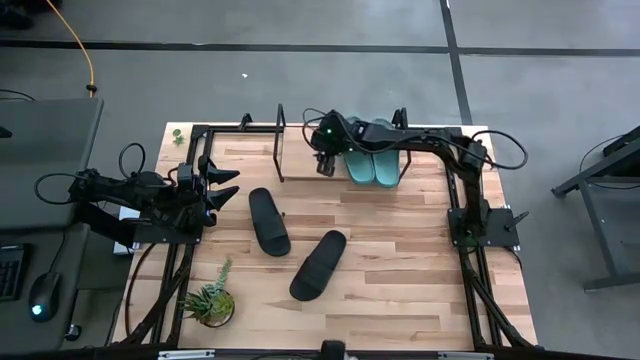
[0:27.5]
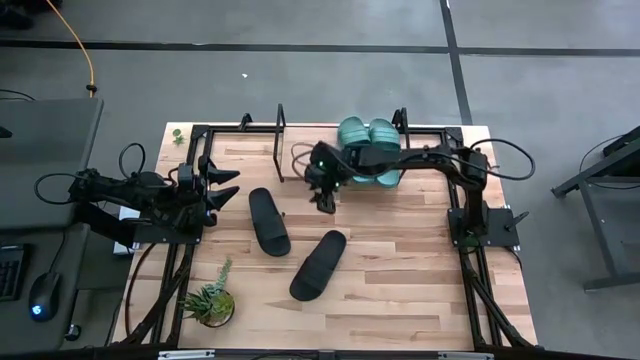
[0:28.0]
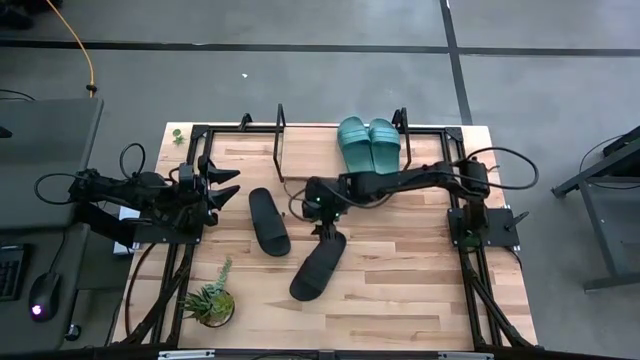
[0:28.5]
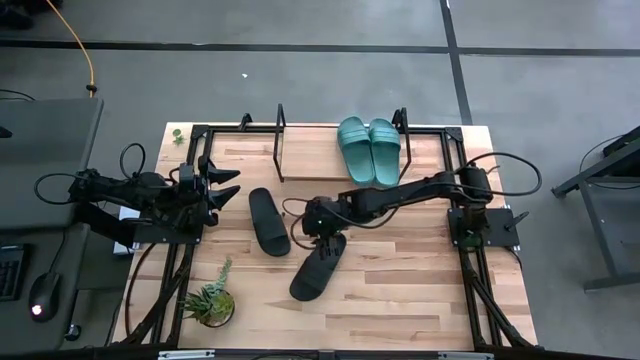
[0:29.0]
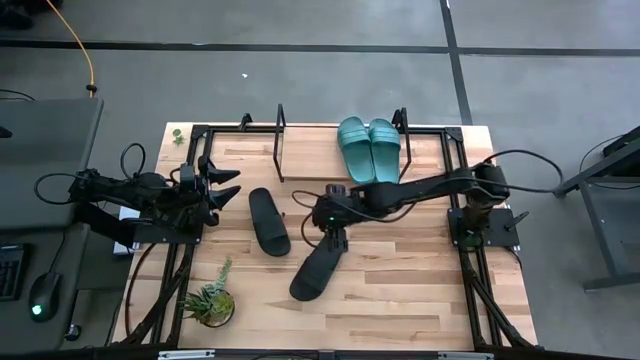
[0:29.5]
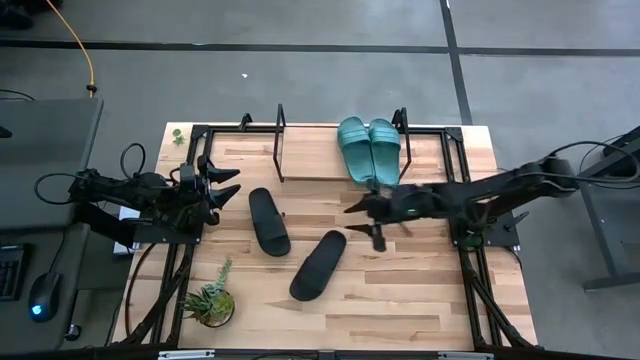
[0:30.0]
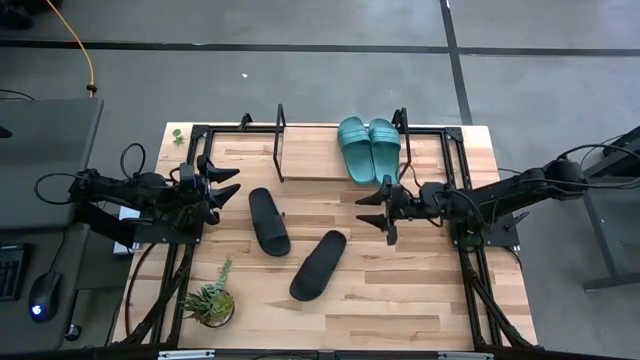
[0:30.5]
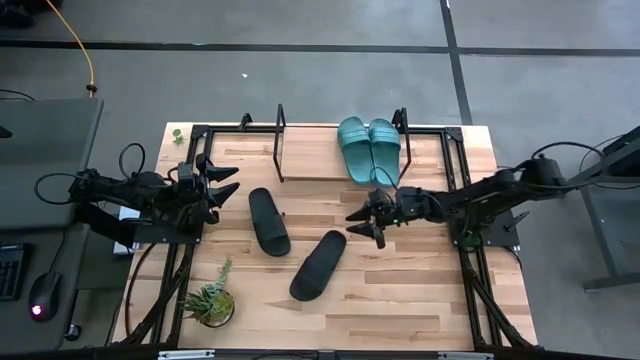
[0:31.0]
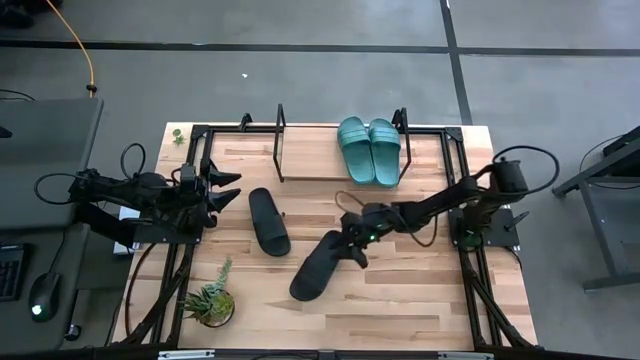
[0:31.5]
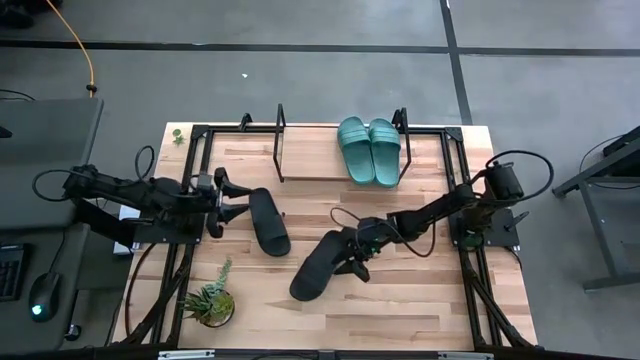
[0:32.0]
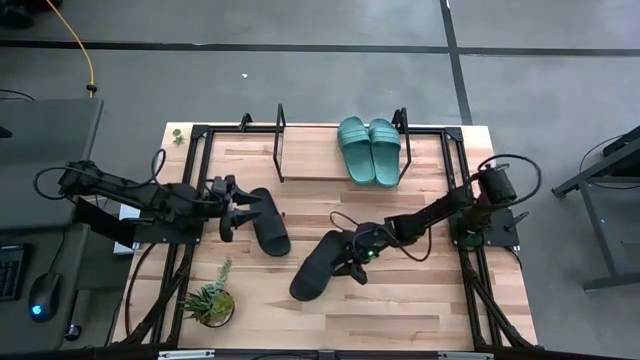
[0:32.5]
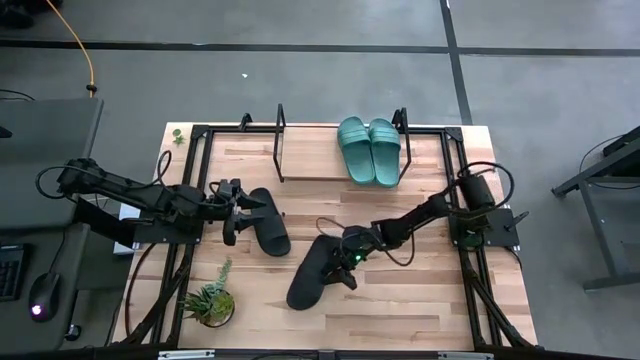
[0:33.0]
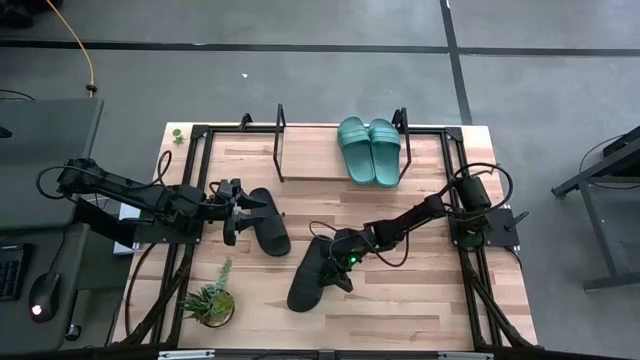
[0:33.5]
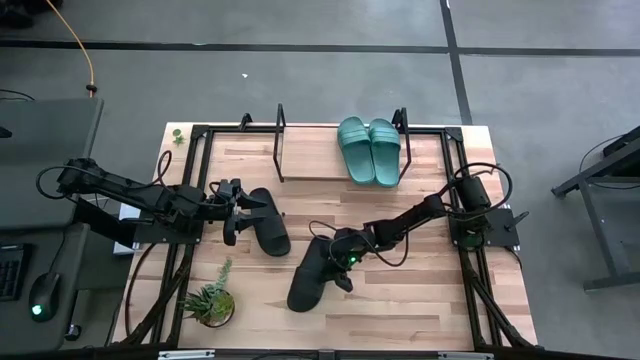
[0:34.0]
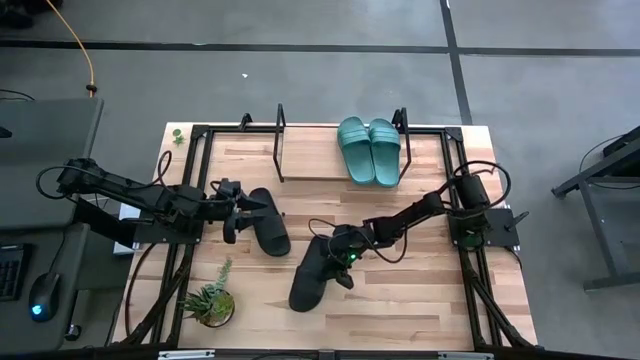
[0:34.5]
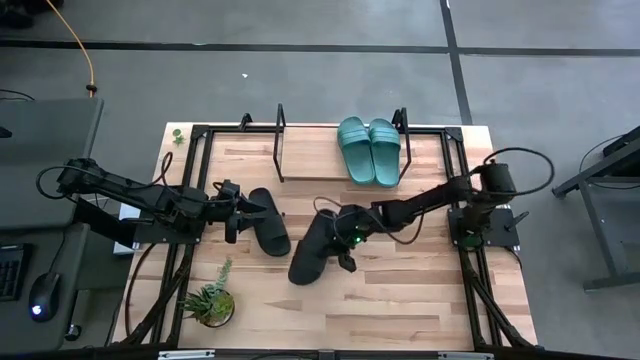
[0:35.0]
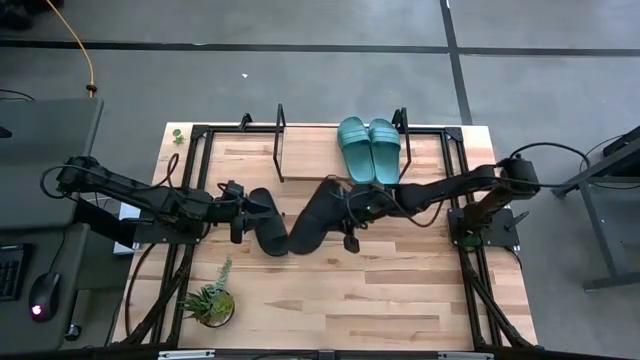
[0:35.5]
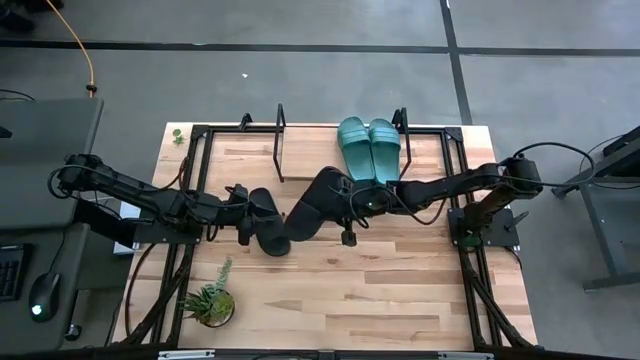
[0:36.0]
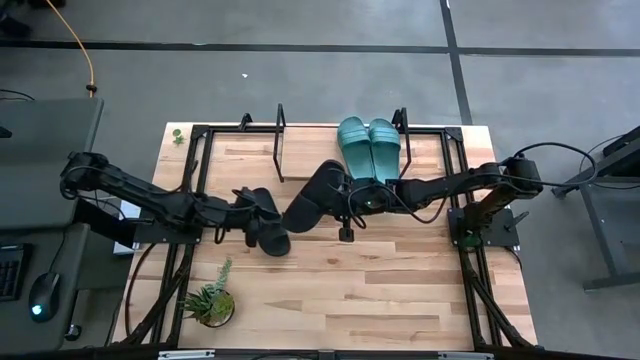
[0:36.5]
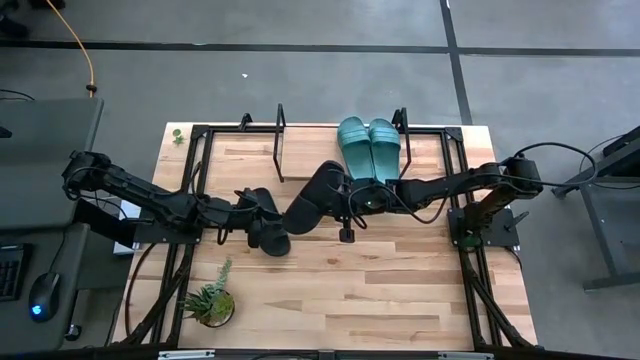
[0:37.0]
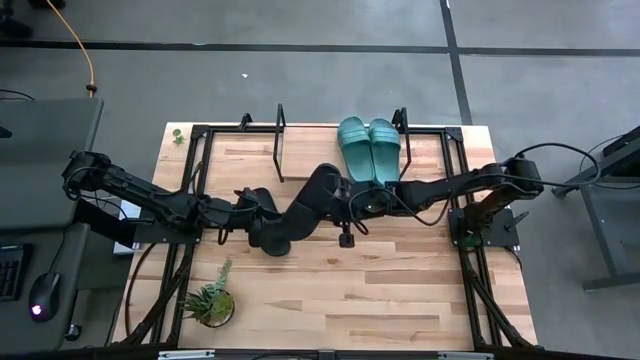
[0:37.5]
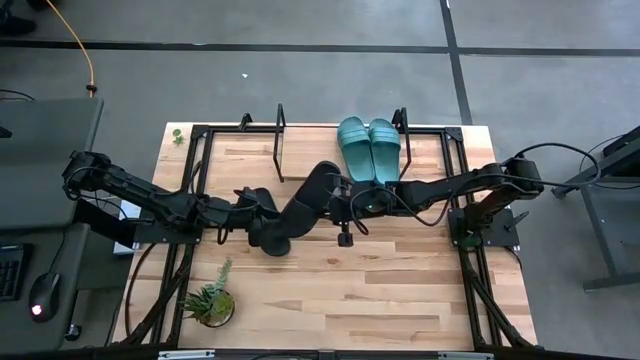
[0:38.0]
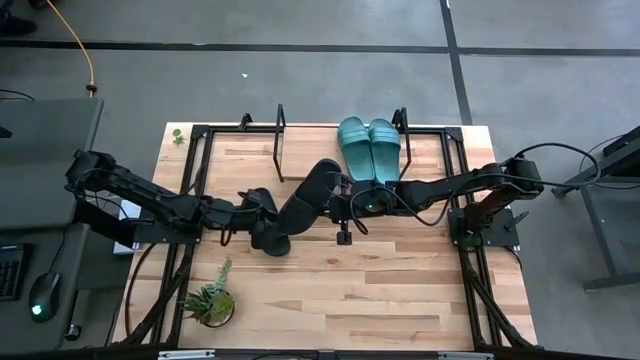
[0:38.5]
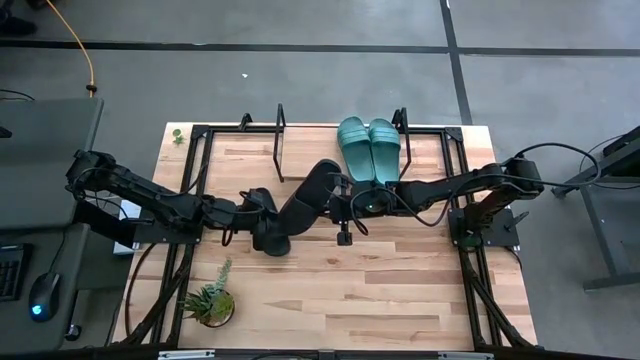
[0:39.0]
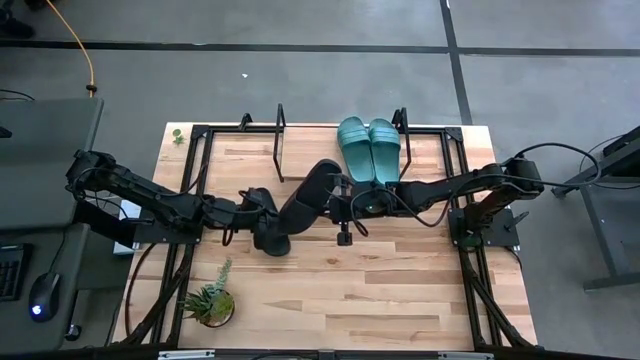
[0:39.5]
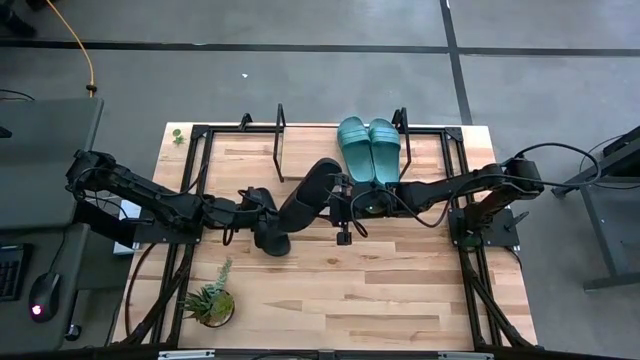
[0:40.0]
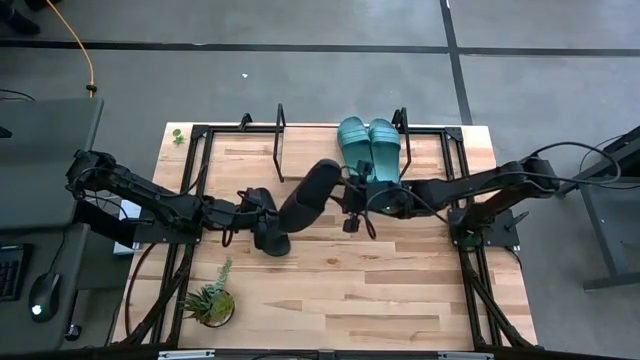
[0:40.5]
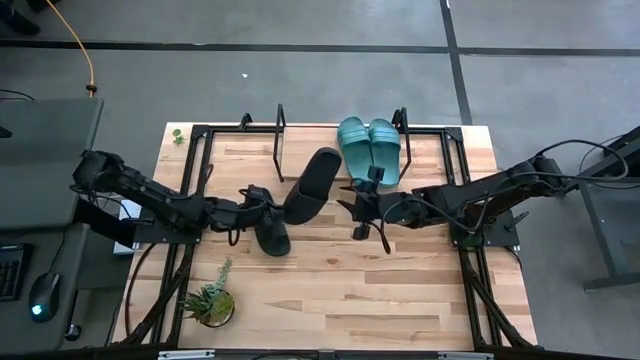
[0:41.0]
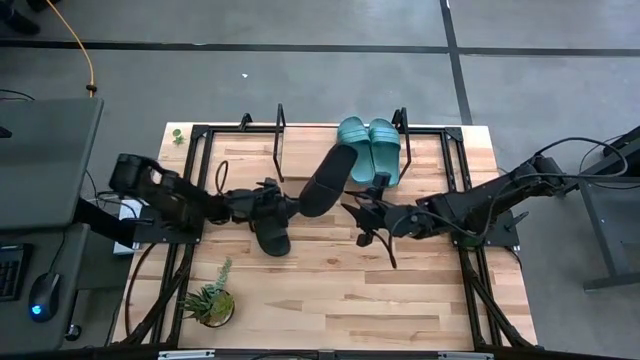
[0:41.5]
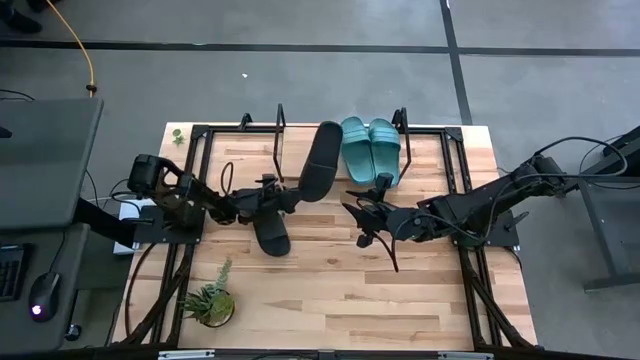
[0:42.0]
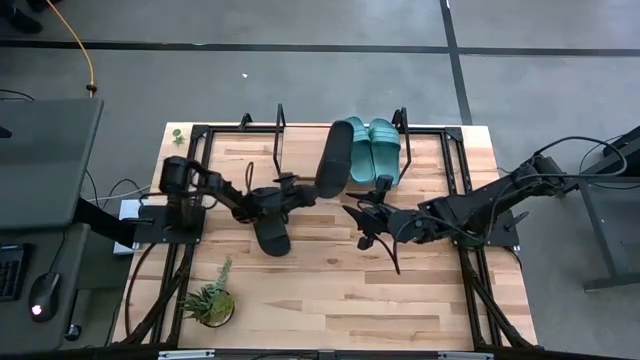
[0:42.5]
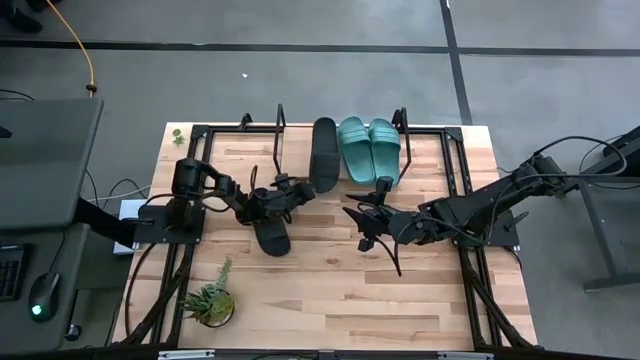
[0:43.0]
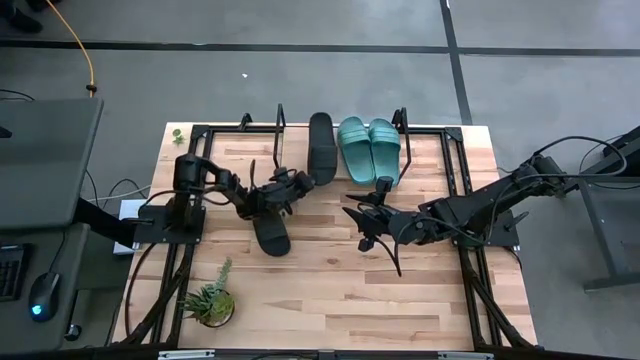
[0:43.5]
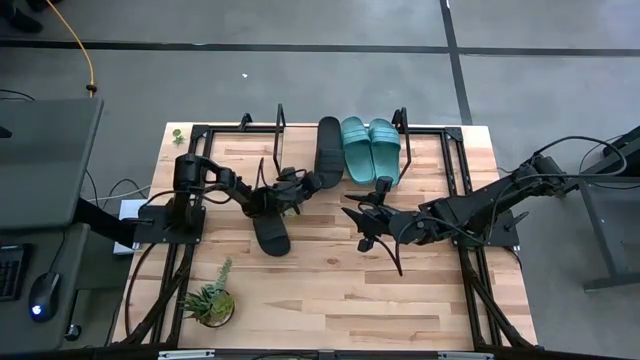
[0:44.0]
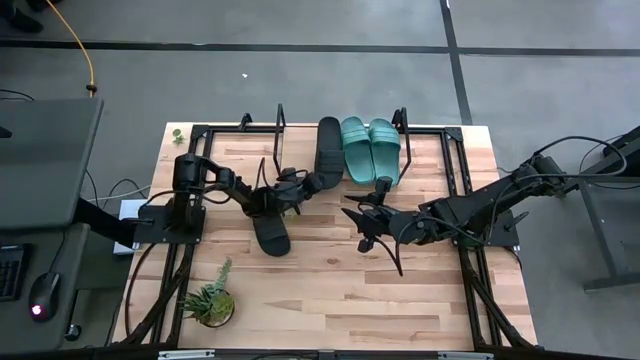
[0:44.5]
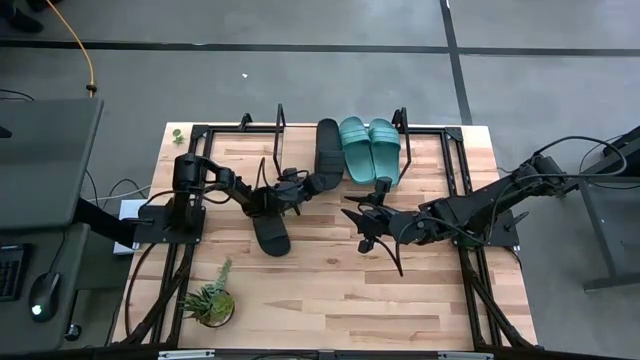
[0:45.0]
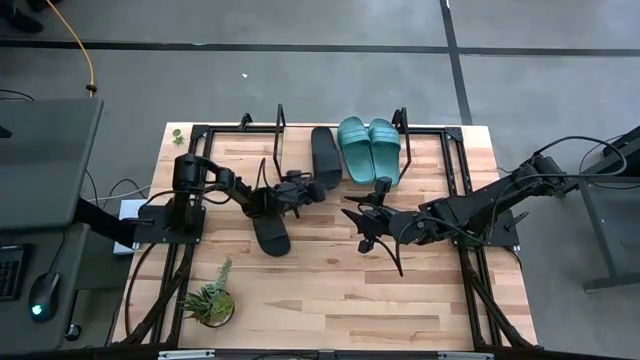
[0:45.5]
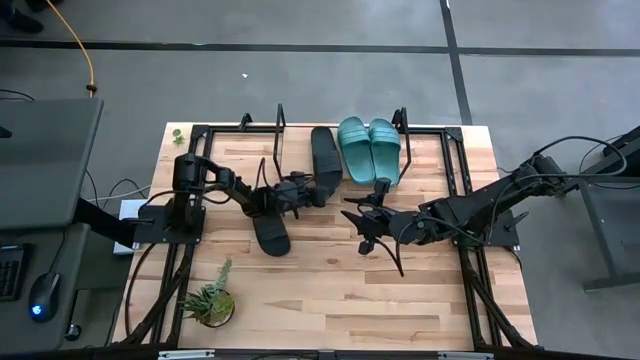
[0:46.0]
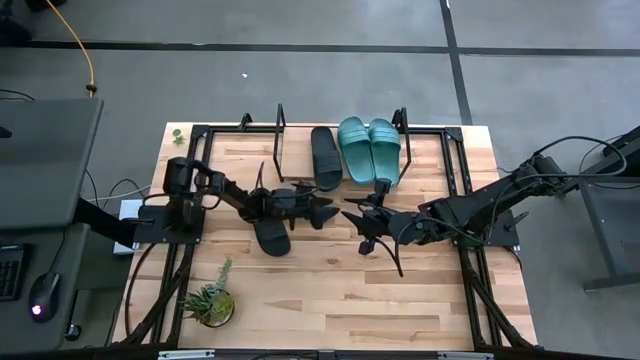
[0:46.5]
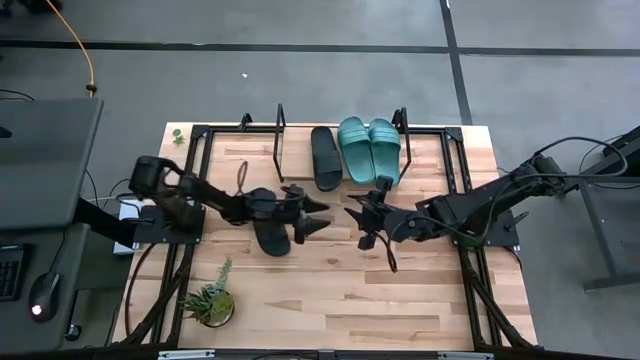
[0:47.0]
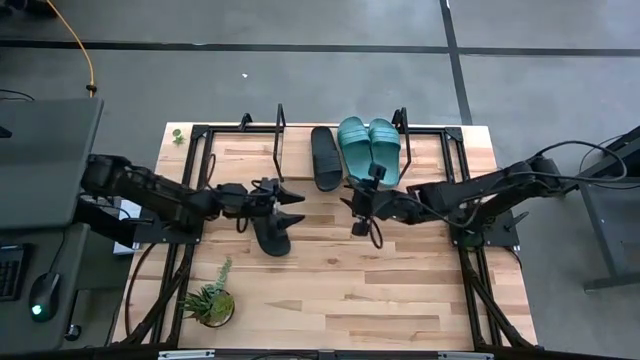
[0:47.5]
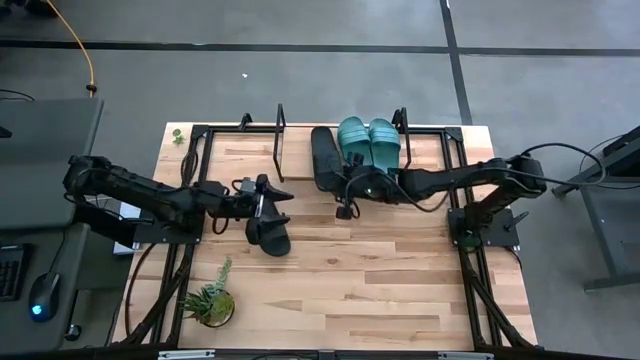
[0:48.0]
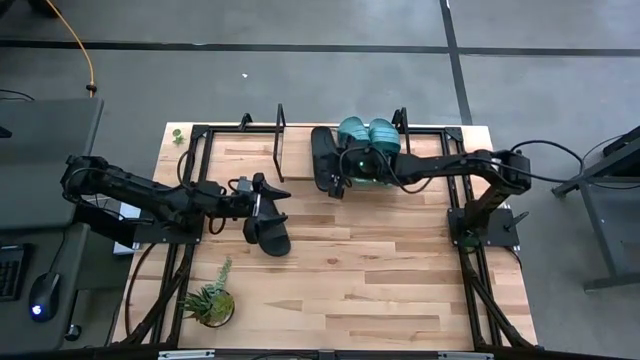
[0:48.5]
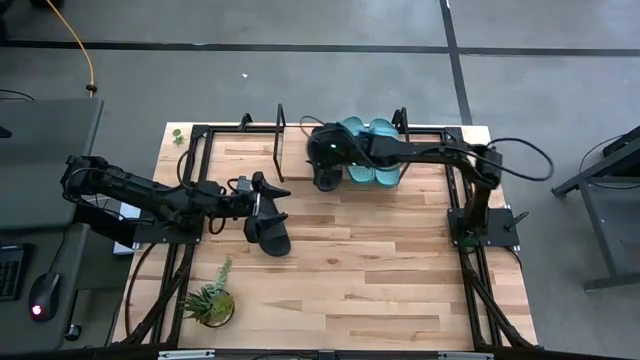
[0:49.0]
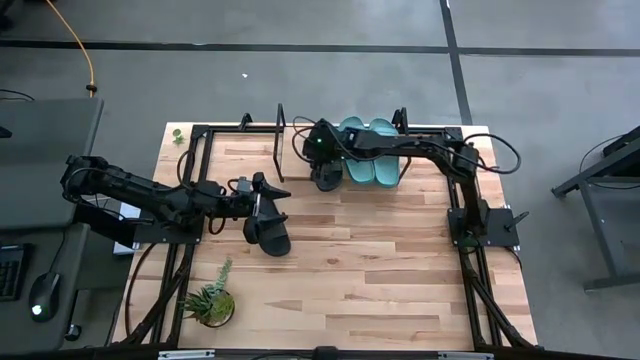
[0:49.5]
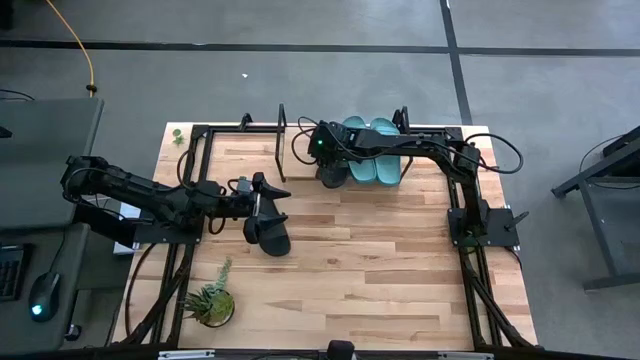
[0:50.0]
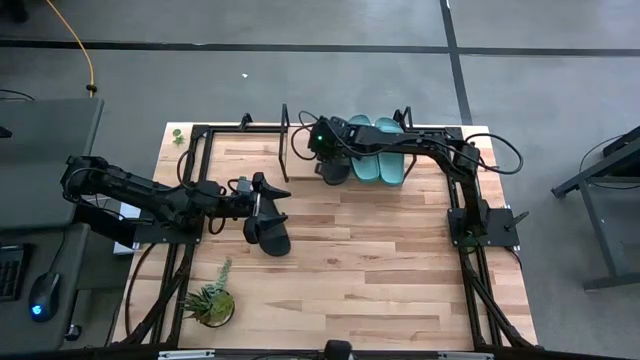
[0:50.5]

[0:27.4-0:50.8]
Task: Pick and place slides into the shelf
Put the right black slide on the shelf
